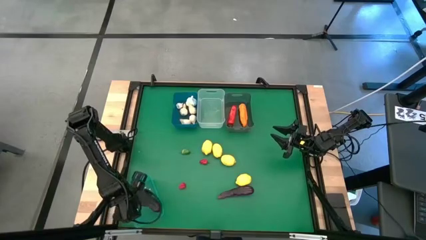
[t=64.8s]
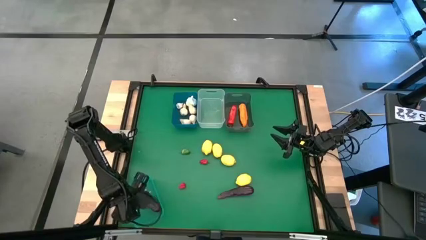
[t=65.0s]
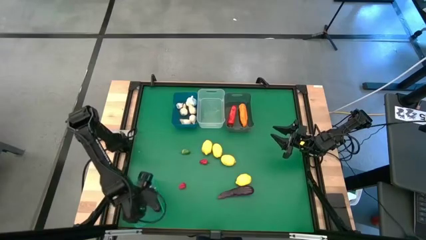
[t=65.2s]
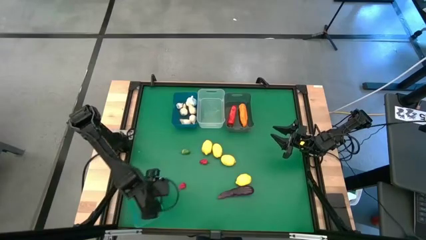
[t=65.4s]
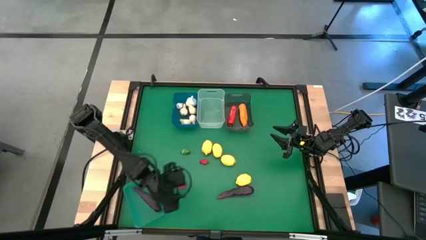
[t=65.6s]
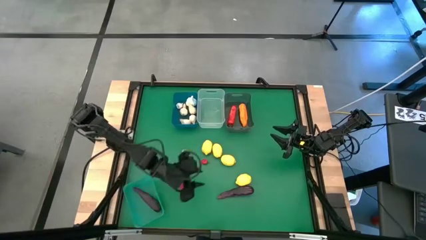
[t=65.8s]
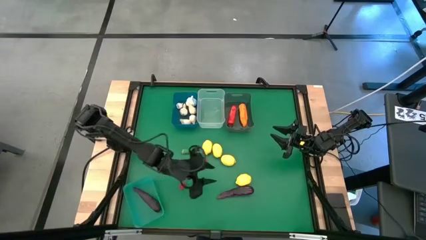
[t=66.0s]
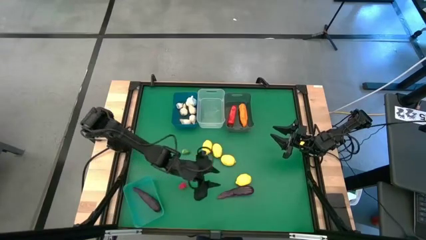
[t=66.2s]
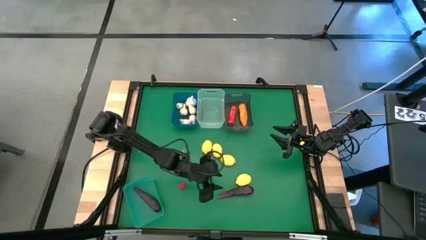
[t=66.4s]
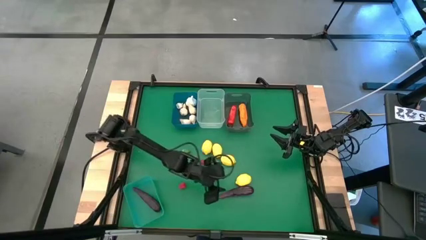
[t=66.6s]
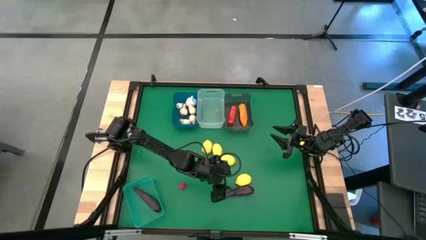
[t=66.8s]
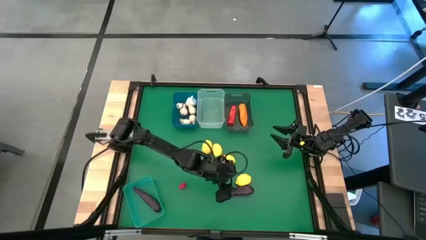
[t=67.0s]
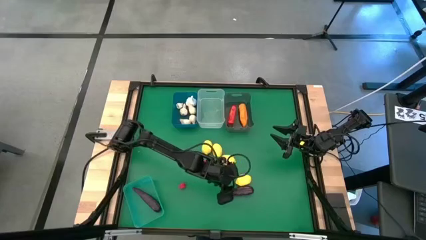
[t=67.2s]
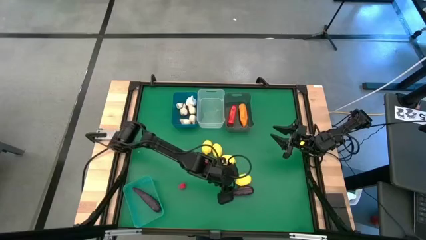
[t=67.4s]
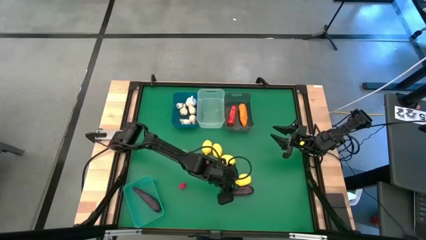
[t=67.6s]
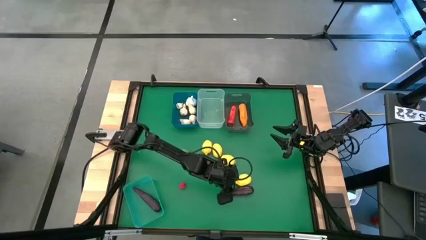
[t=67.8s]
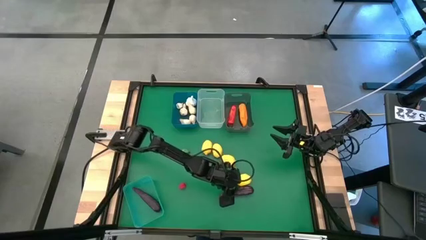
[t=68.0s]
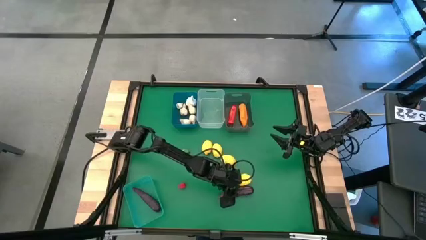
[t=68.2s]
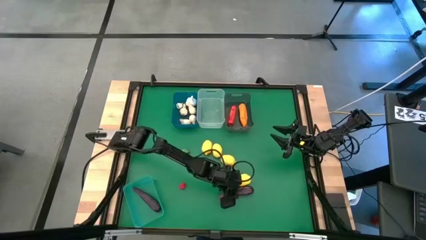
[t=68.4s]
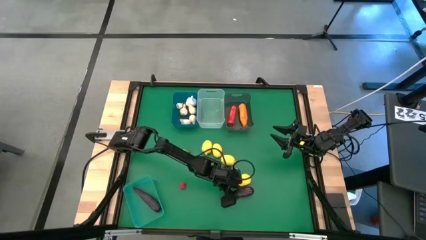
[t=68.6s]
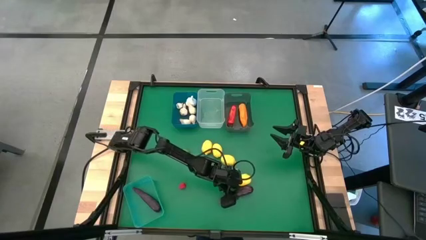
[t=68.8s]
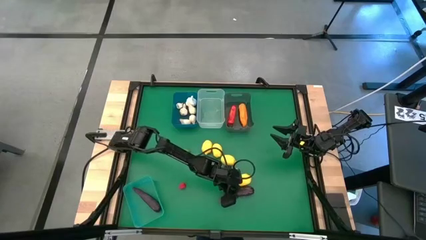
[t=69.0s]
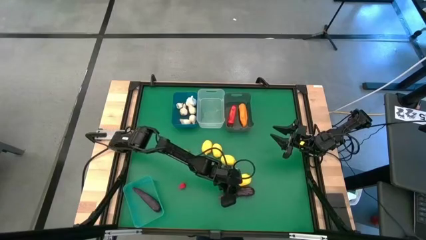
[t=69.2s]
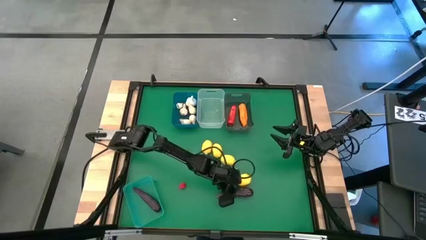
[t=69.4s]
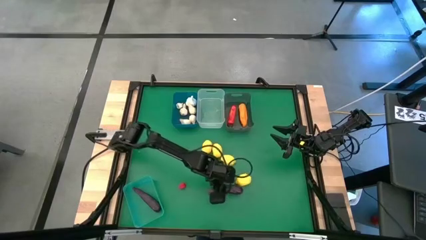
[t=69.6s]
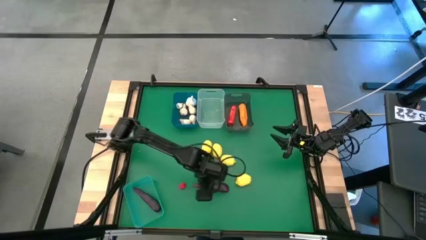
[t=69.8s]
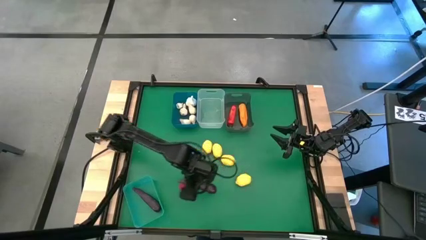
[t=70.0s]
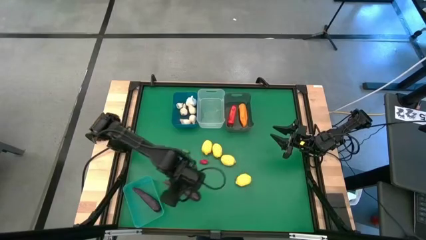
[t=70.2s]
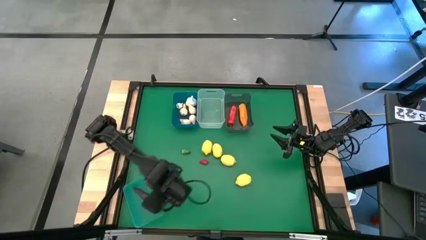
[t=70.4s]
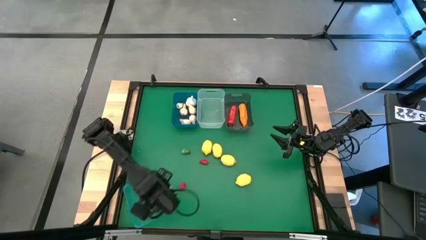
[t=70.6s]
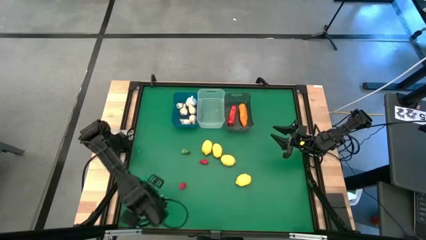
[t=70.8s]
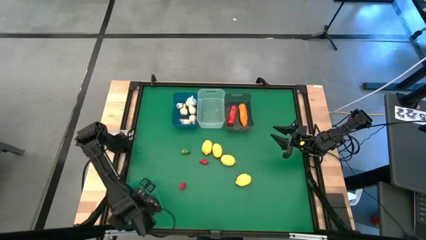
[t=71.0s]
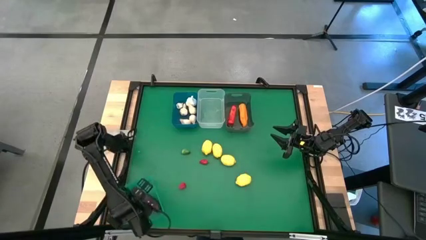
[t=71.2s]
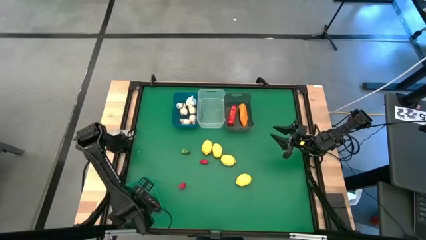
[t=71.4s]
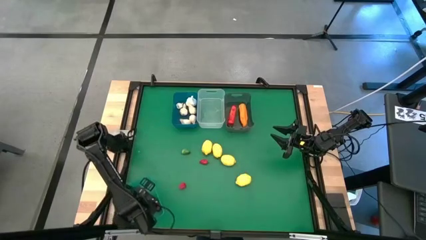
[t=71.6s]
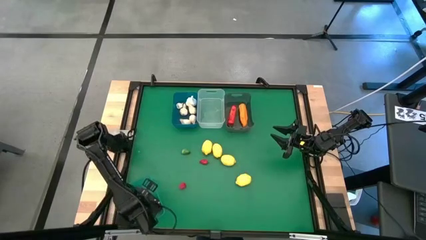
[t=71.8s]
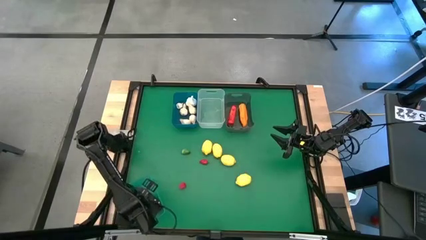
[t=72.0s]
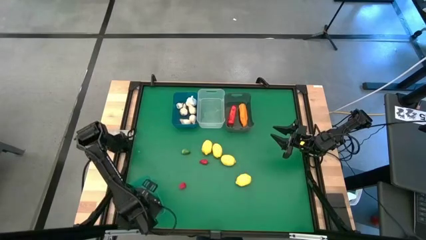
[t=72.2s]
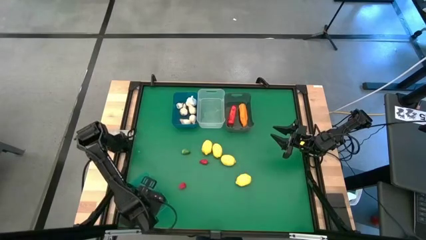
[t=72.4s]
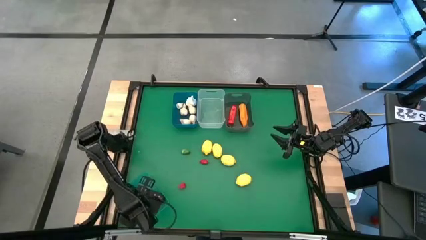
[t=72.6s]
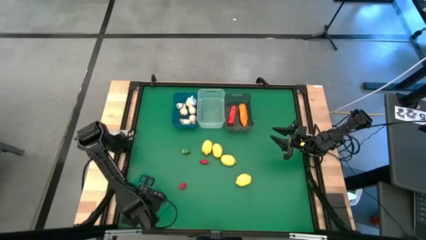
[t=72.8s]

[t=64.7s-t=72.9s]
Task: Sort produce into baskets
Put the purple eggplant into the green bin

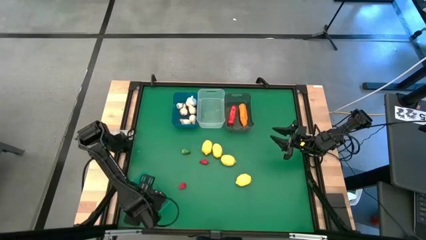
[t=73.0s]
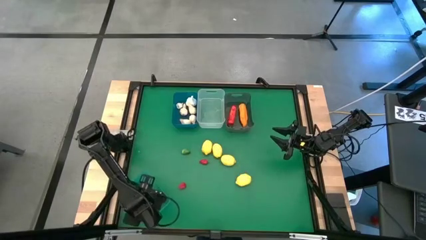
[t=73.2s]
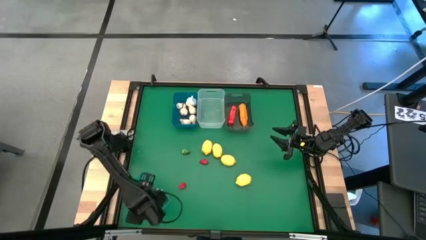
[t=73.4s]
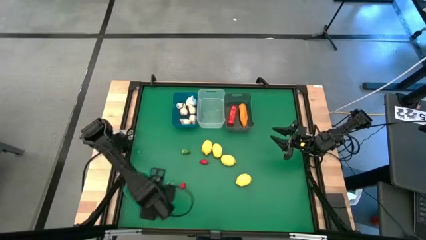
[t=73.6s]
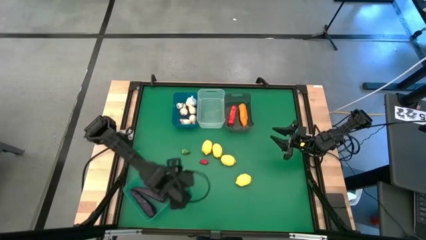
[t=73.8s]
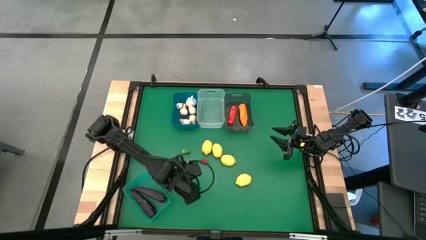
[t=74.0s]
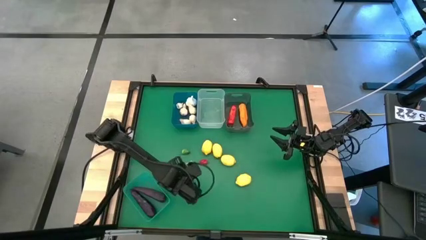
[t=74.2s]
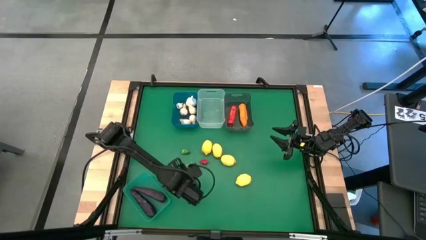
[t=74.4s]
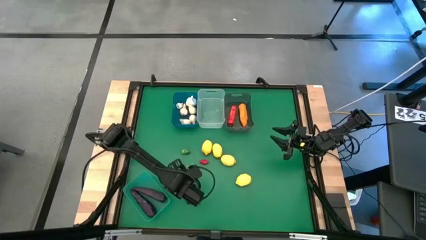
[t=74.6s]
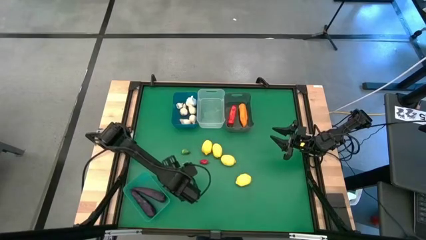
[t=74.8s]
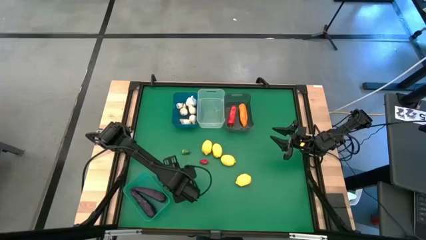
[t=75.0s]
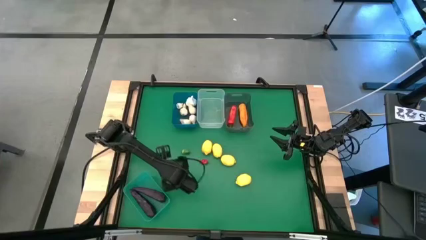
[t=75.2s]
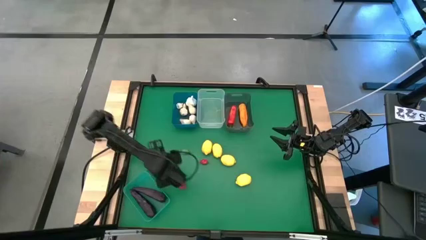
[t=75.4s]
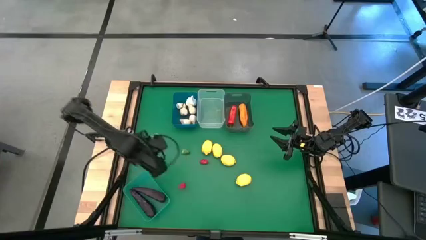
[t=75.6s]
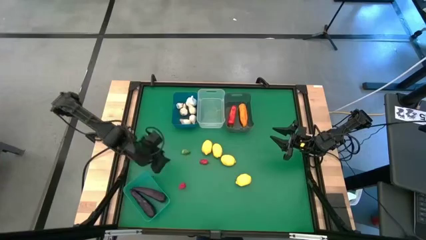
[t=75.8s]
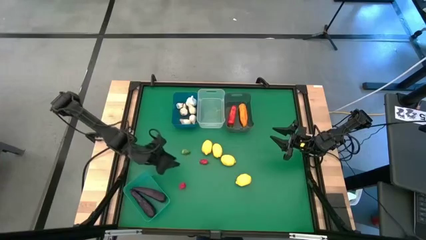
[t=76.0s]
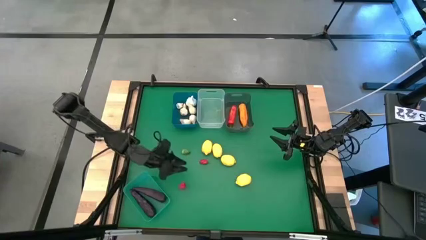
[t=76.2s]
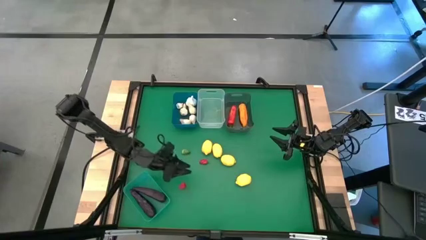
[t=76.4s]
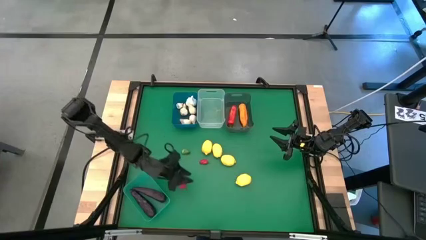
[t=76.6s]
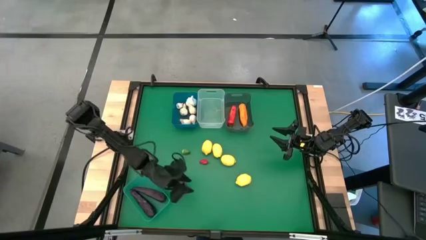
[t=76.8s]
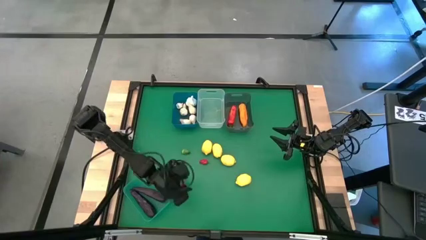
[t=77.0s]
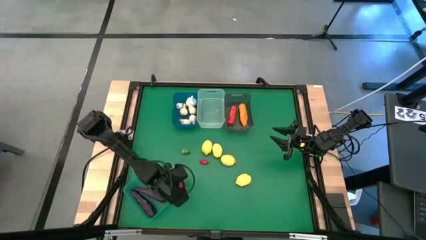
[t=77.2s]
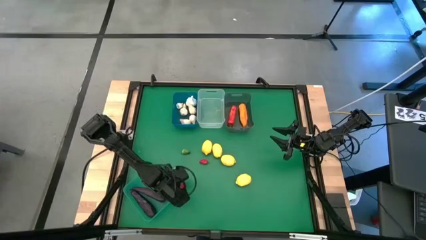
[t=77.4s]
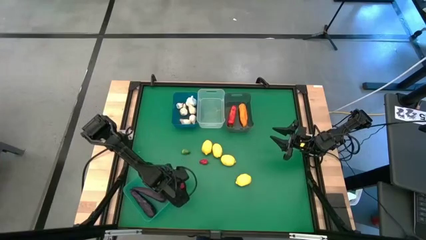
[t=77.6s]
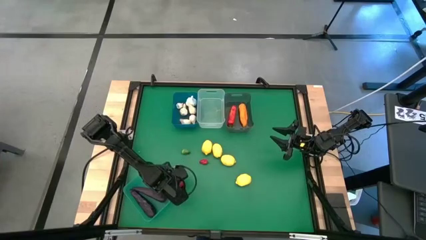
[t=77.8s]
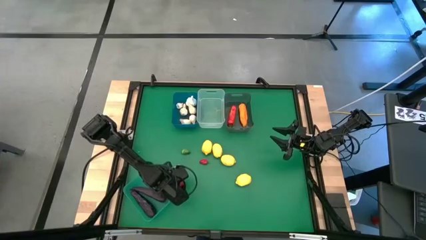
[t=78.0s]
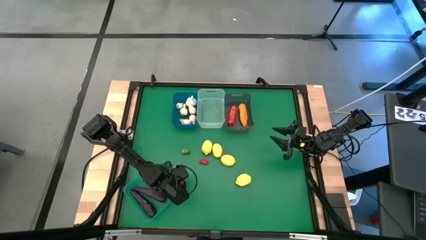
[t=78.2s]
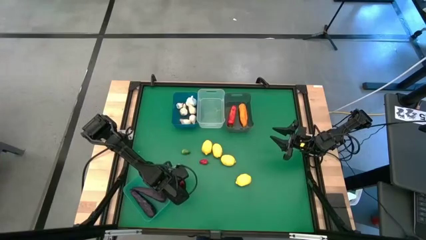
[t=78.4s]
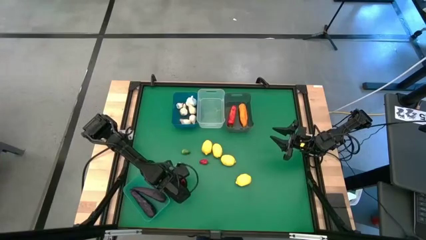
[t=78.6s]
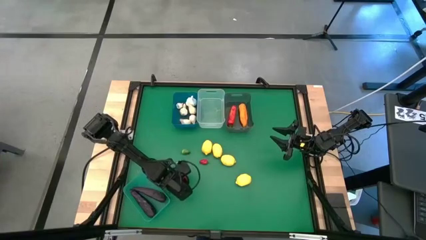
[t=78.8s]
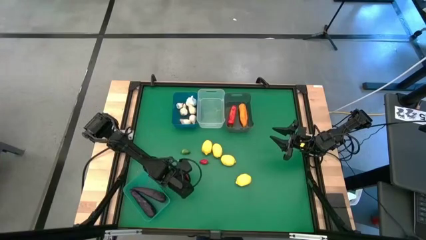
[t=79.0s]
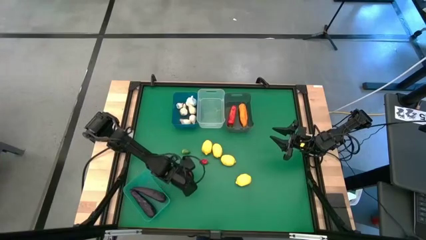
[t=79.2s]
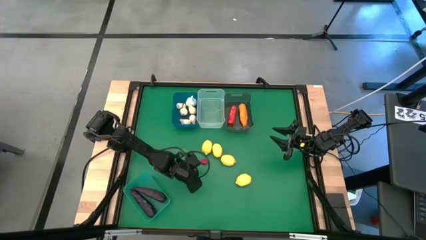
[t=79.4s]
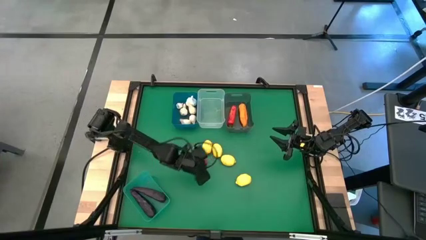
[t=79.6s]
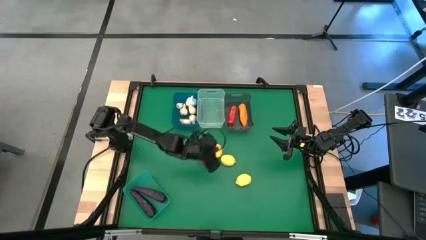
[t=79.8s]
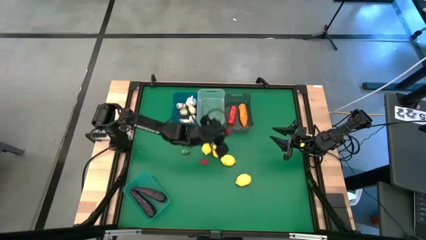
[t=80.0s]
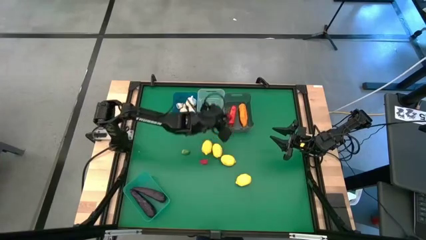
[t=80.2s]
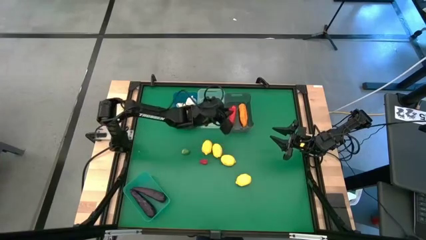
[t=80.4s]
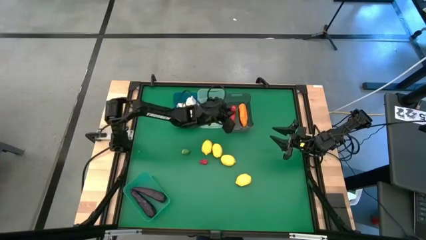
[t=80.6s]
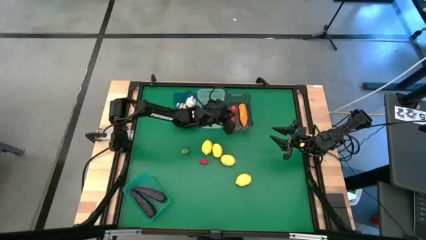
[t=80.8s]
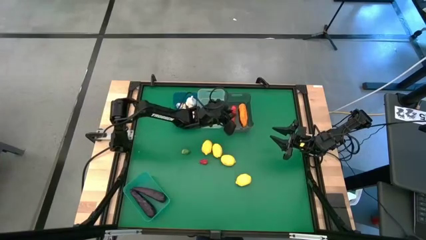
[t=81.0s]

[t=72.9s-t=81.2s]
Put the red chili pepper into the black bin
